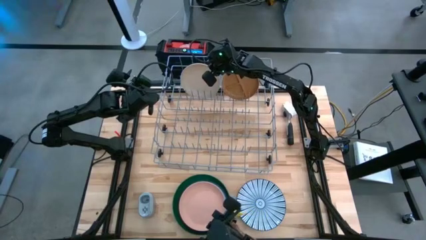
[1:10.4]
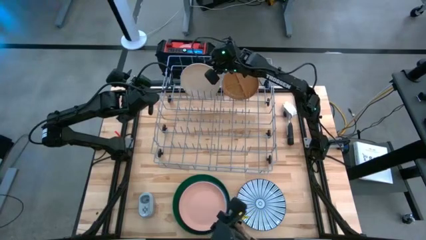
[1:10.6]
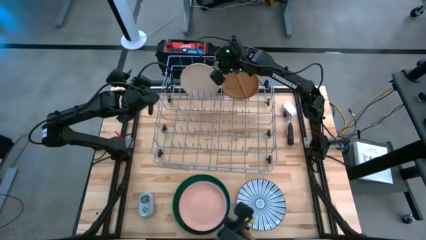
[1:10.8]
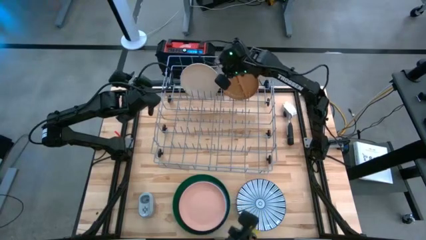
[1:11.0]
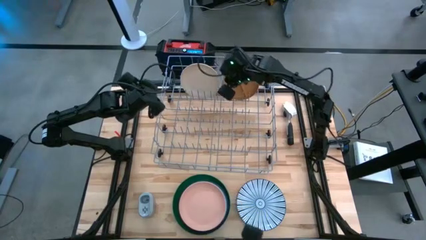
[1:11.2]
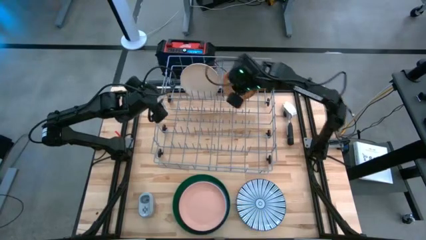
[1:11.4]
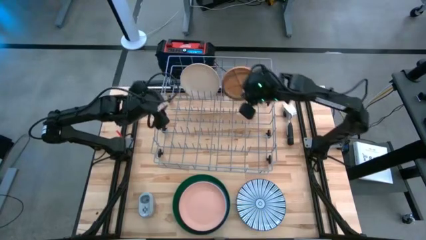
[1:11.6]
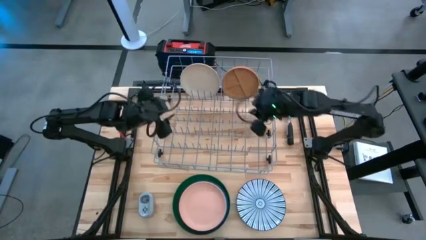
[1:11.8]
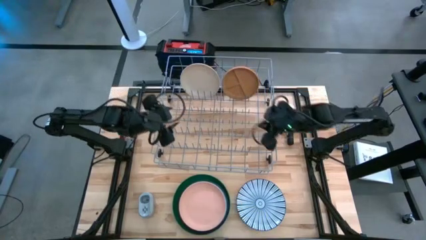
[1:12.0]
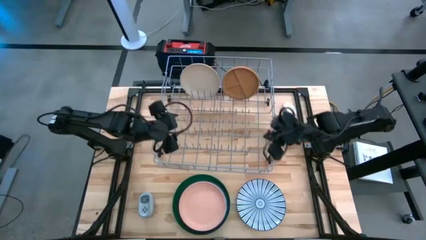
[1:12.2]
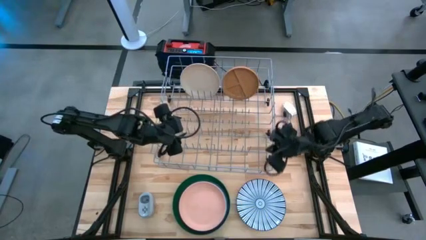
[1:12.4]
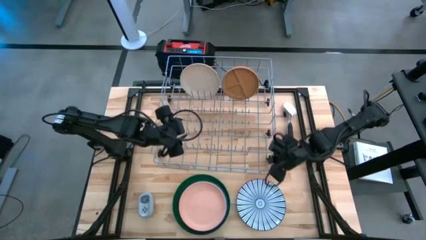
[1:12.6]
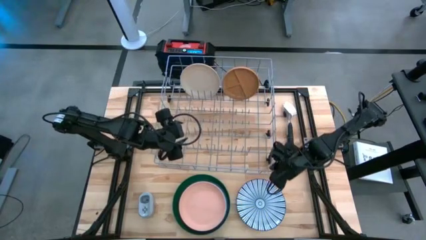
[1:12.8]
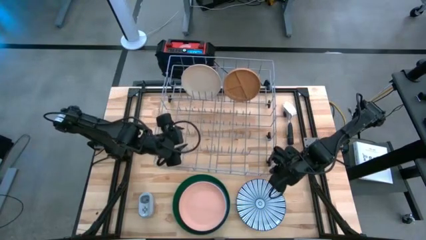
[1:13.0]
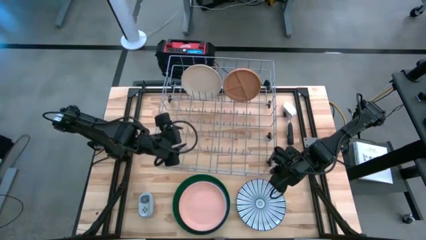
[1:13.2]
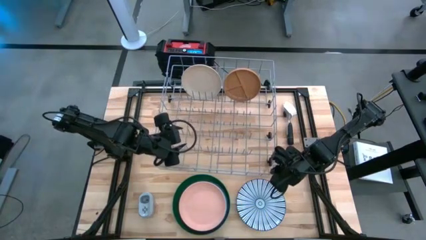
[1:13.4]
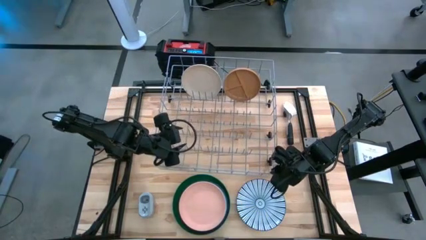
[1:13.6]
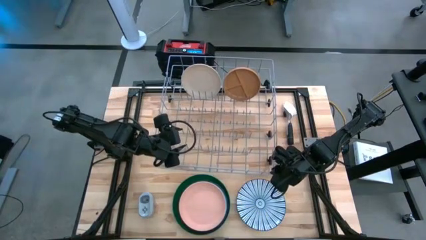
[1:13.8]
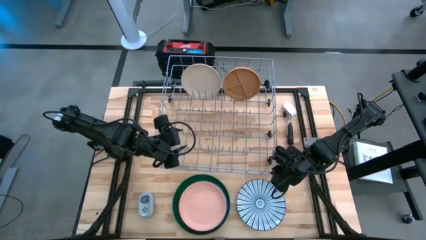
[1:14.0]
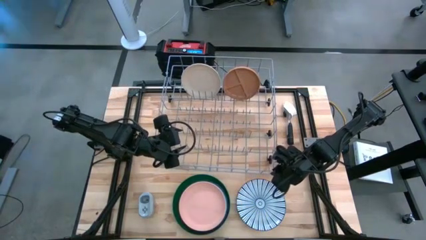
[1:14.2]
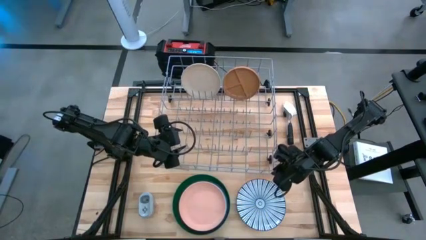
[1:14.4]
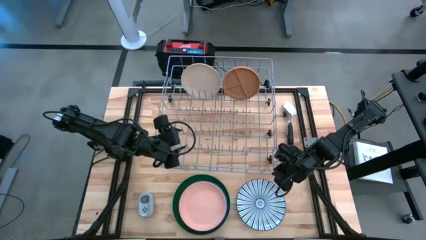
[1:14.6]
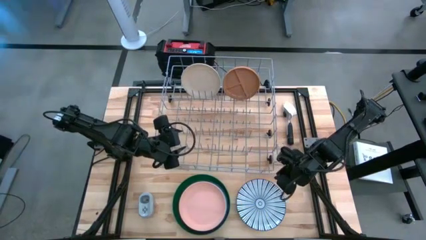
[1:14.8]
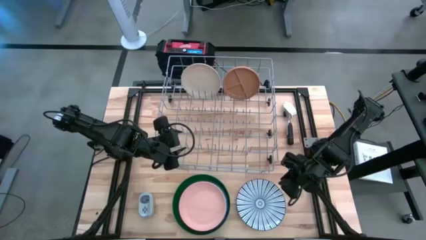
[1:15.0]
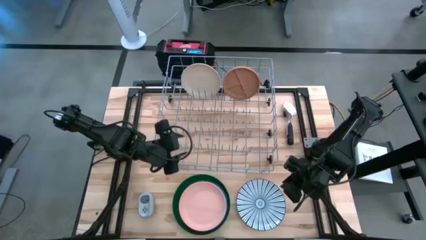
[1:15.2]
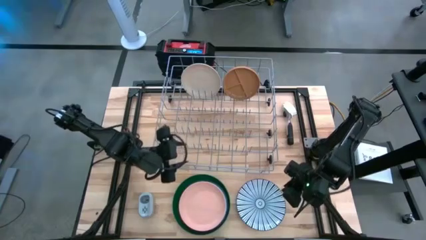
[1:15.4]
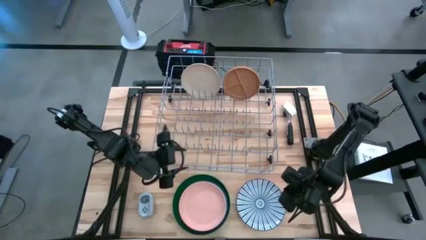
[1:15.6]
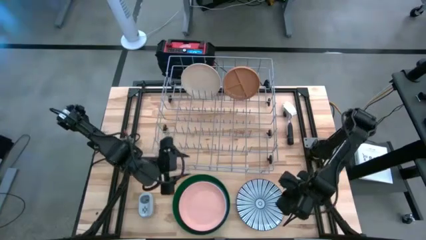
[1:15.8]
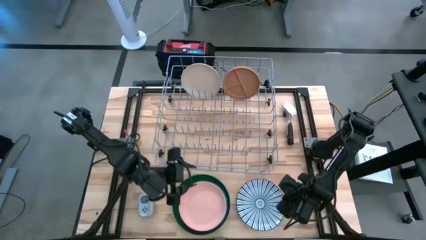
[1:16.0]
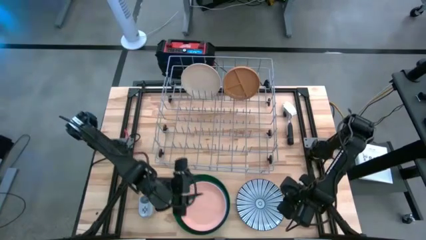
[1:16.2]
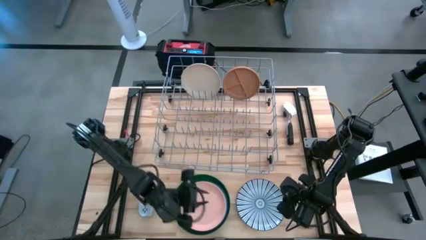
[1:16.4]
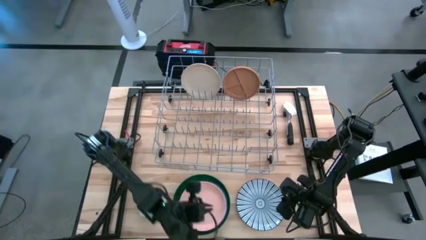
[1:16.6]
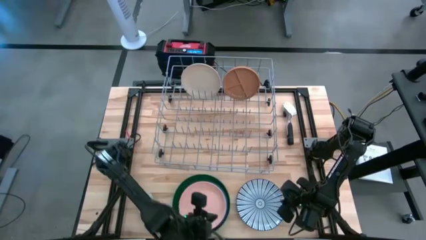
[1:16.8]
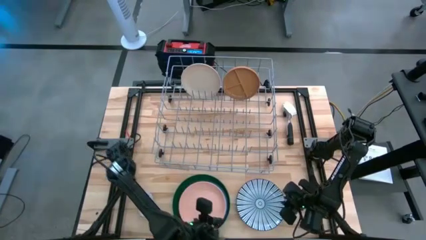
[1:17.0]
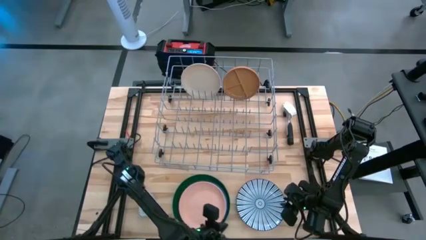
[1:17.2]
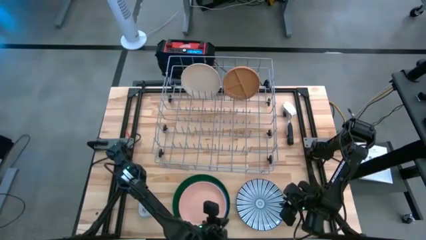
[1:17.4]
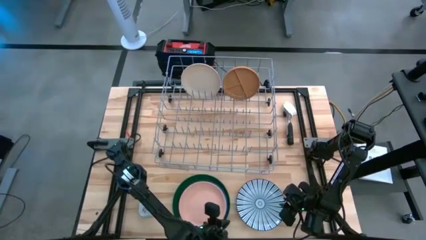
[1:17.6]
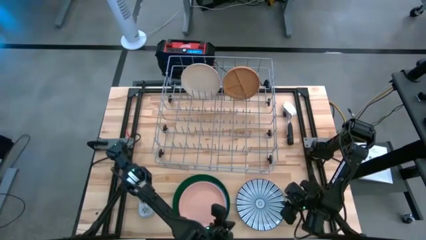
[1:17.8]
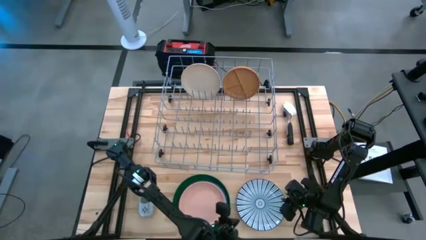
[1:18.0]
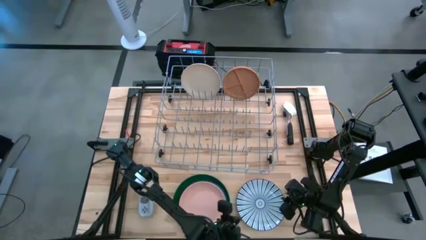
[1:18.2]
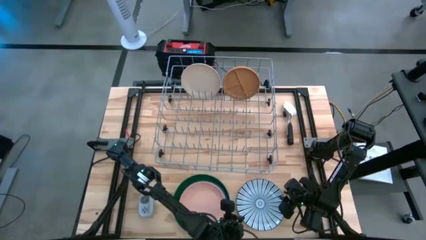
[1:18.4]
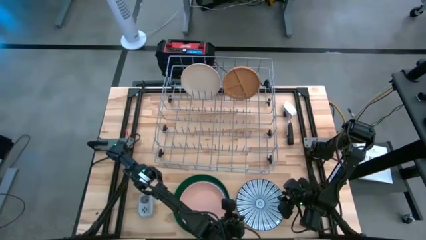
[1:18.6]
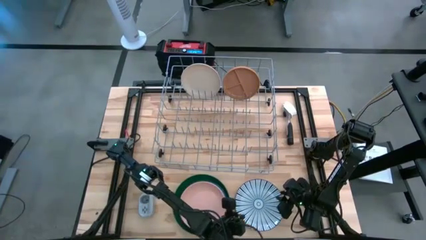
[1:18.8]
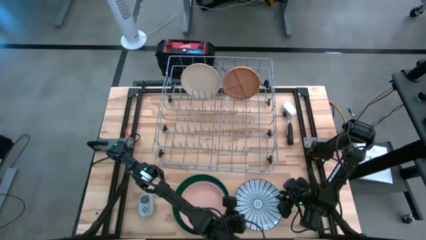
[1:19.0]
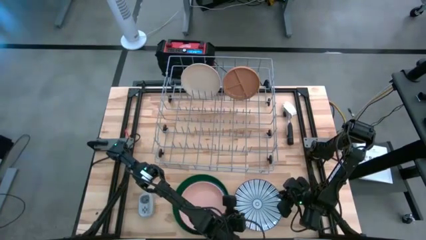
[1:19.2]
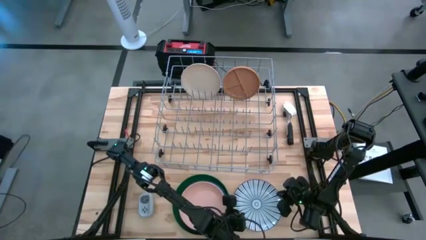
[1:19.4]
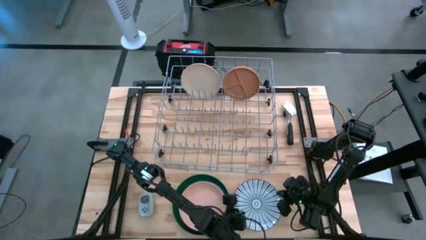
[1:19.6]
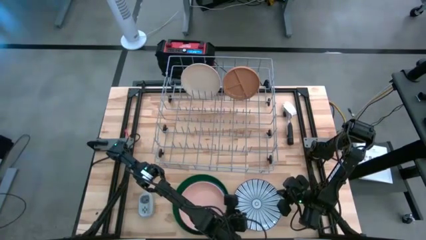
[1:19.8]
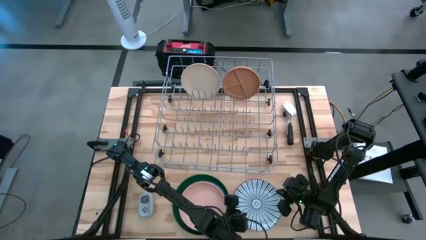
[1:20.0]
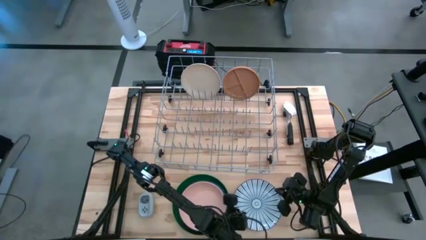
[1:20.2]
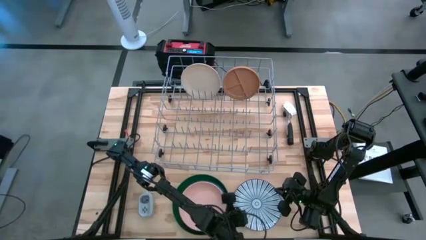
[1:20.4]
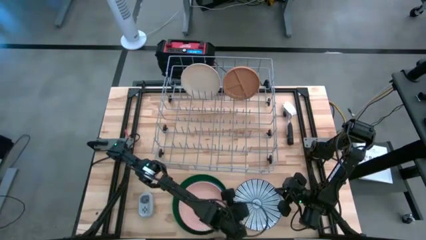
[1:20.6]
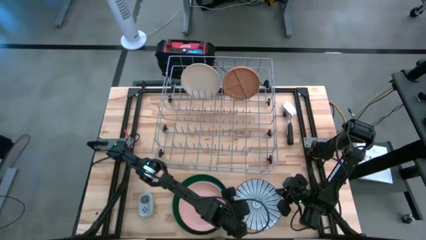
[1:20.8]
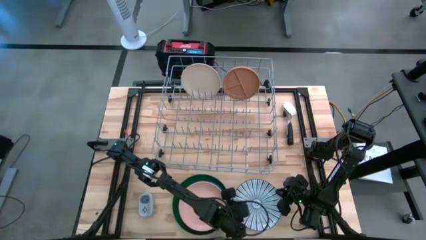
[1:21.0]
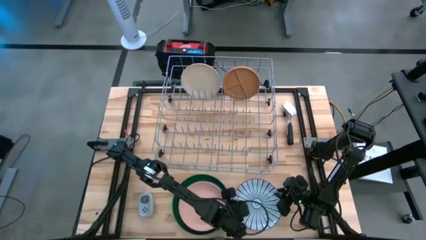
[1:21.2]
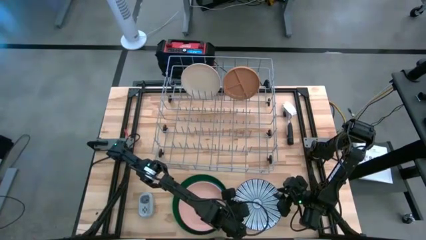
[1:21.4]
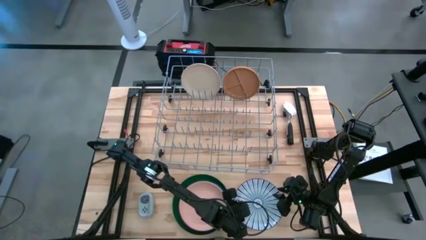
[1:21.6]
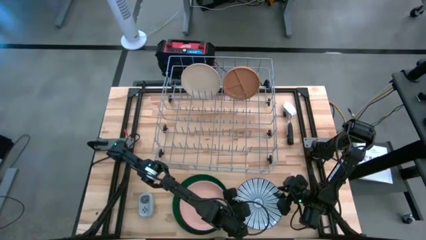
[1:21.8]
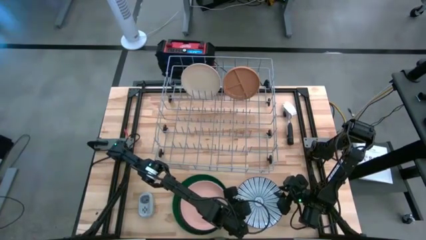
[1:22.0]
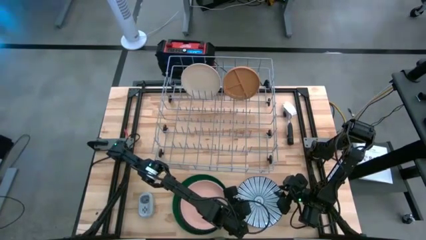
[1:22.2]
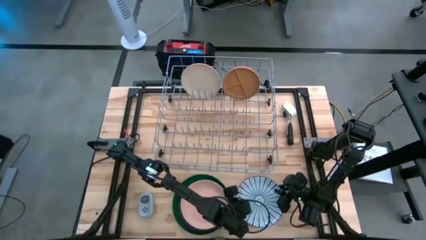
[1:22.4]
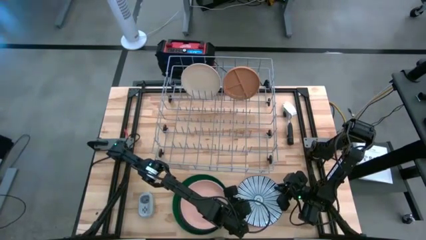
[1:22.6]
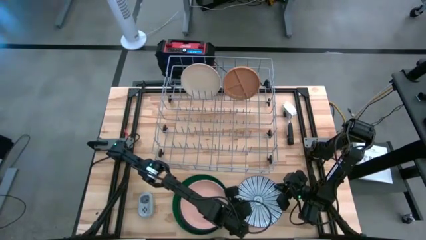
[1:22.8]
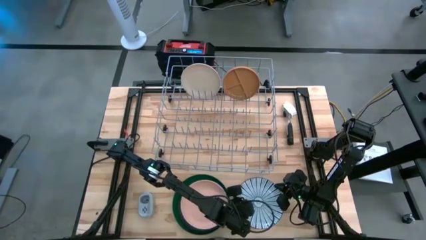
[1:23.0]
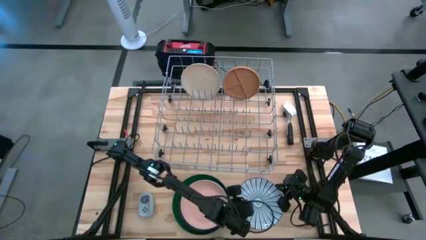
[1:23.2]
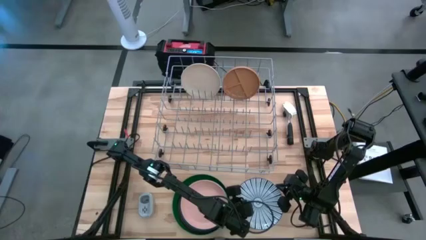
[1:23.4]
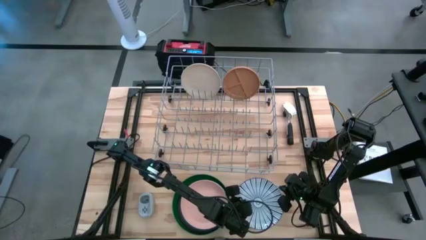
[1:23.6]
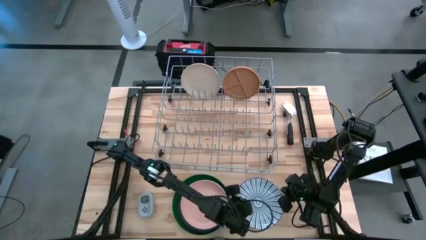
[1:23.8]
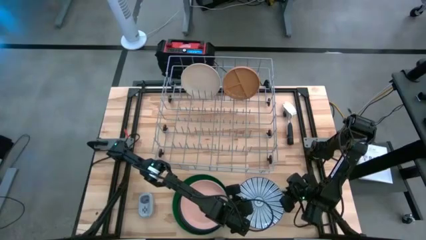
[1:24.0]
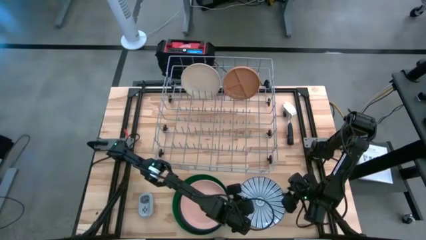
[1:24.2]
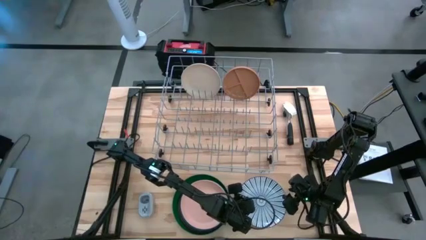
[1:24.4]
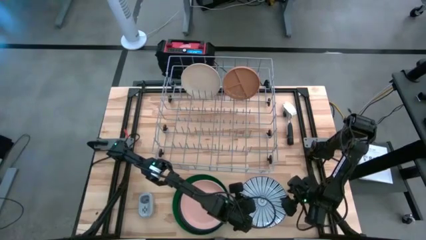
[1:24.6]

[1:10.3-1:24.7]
Task: Sort dishes
Put the blue patterned plate into the dish rack
